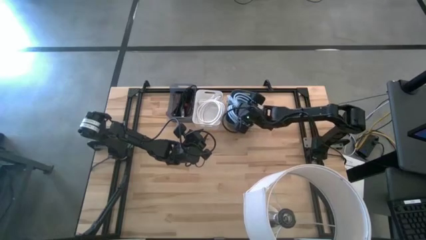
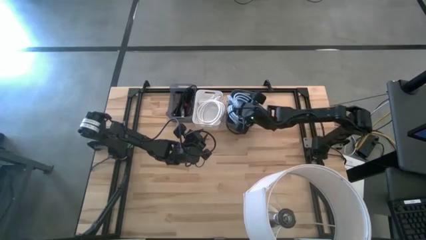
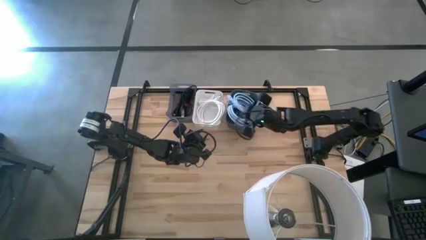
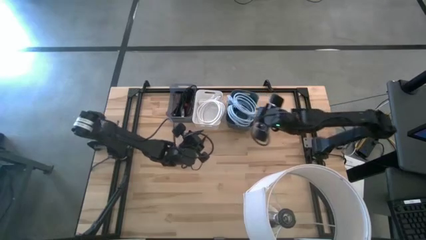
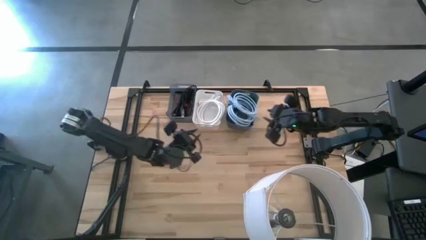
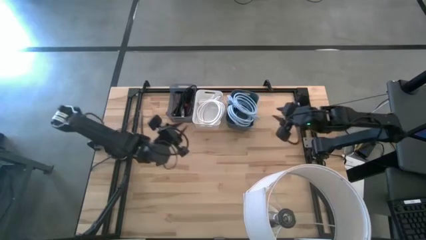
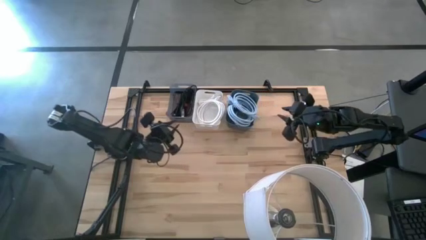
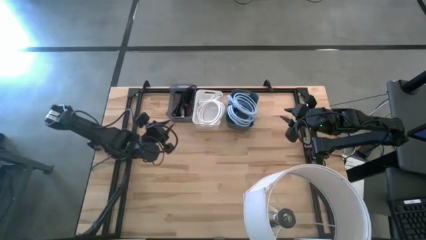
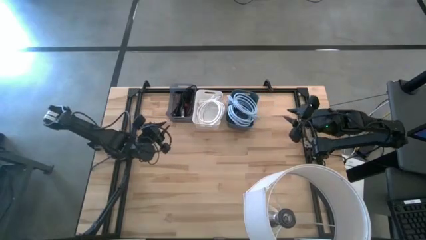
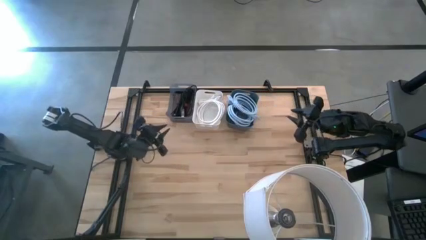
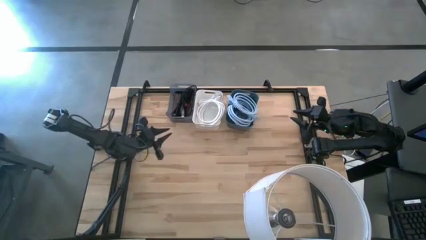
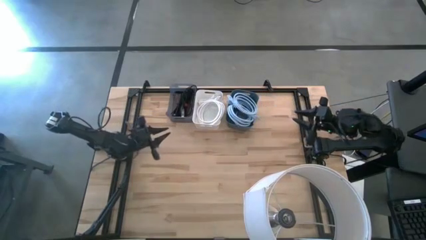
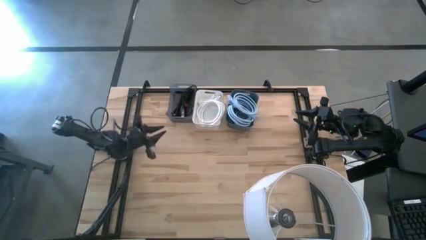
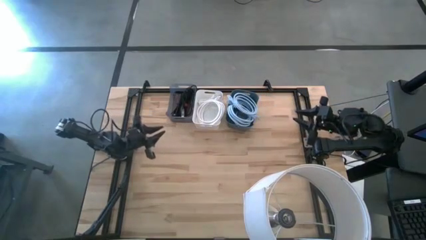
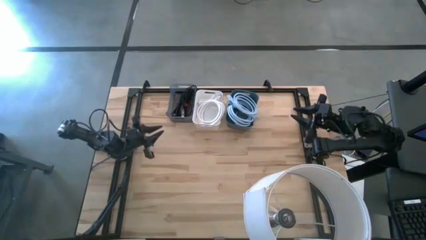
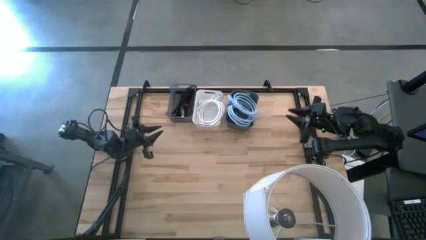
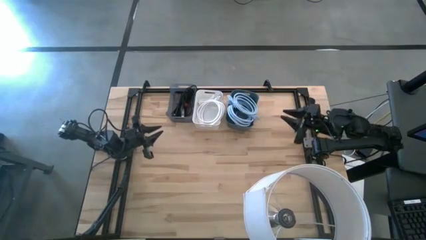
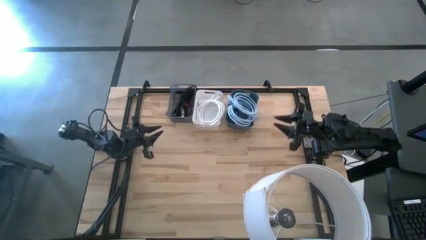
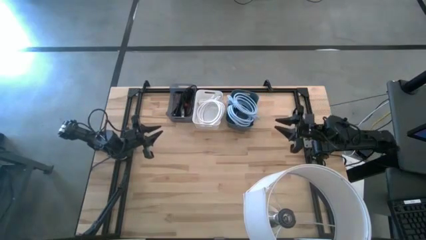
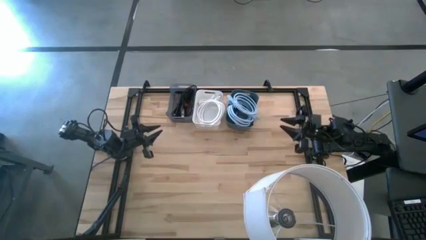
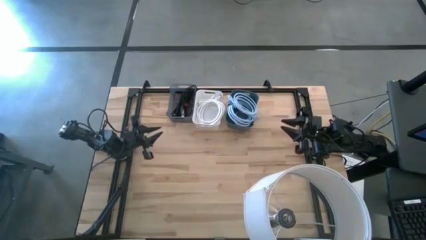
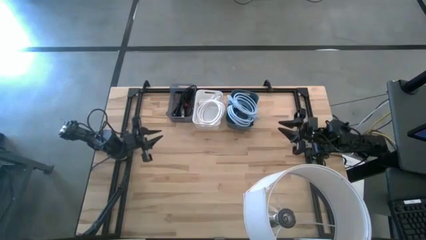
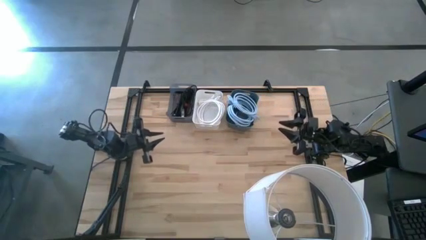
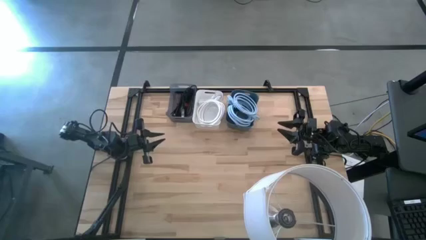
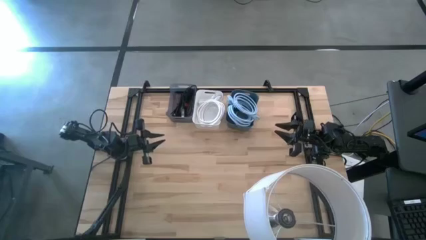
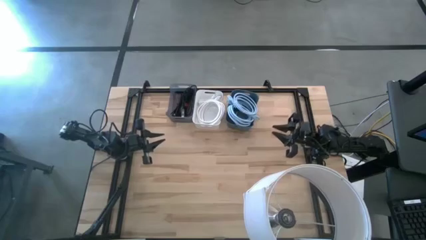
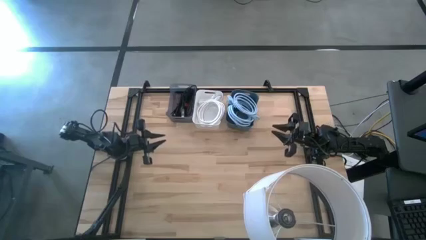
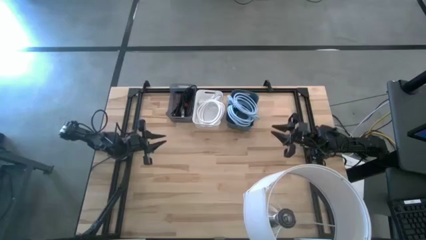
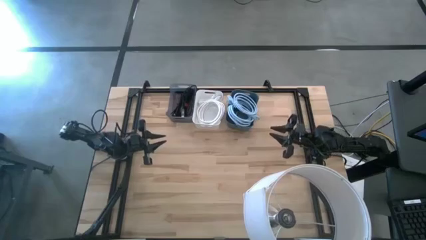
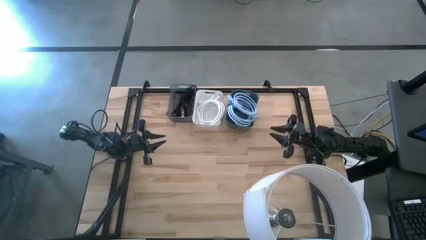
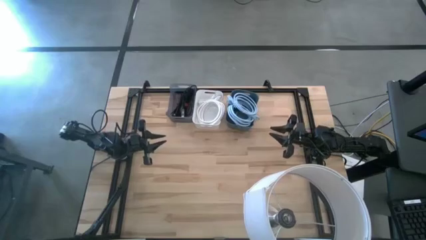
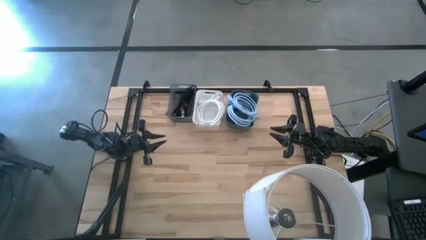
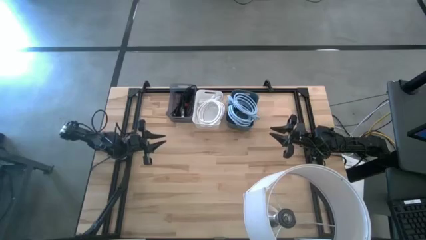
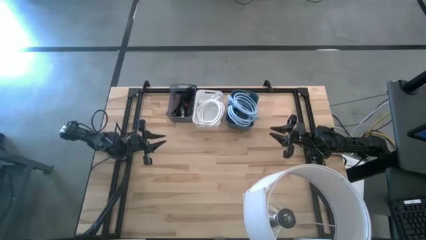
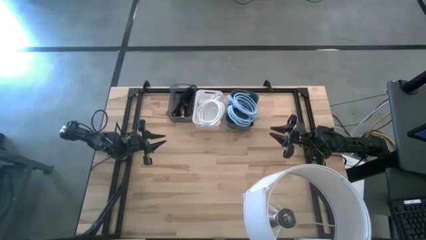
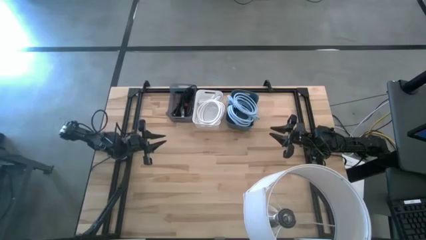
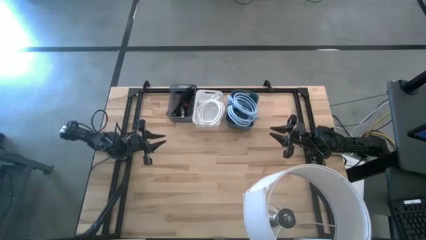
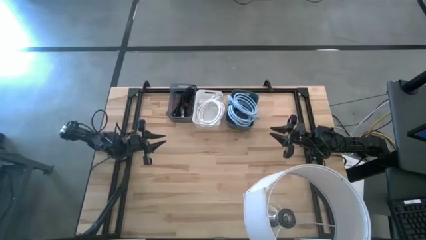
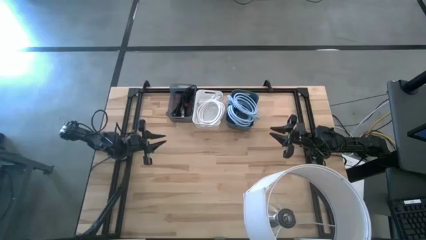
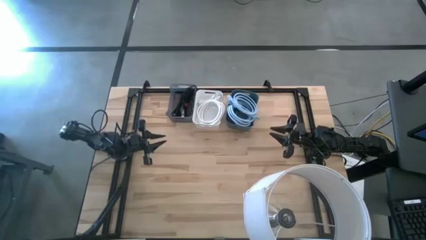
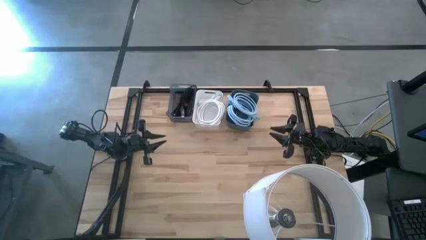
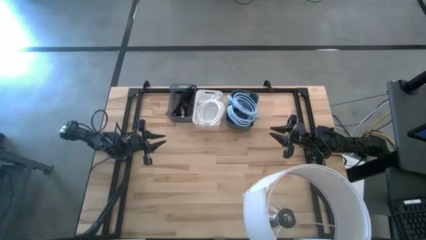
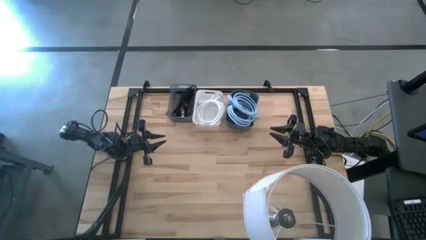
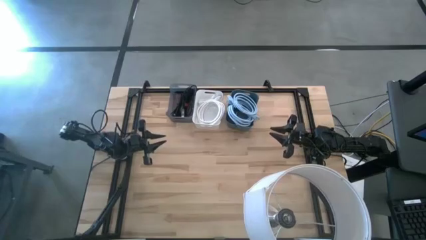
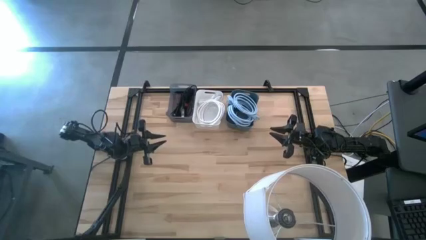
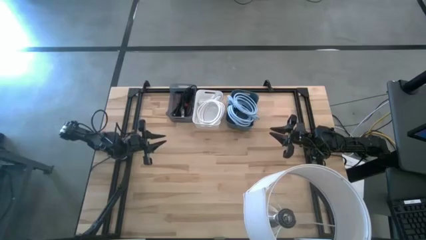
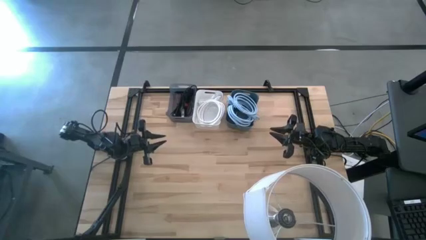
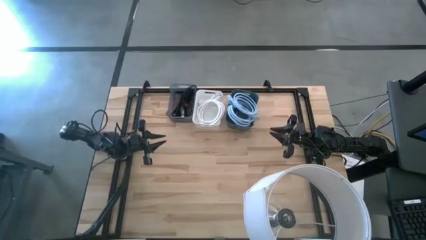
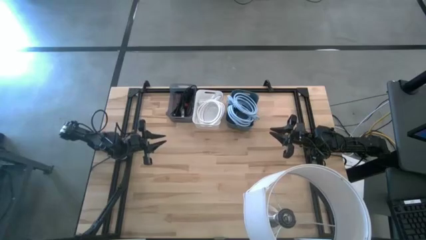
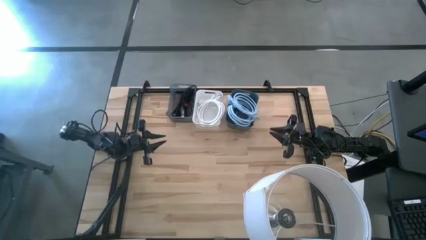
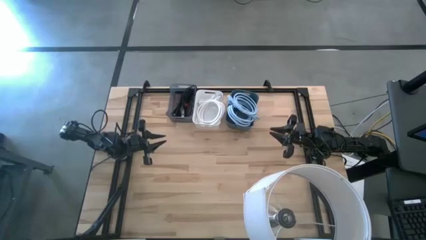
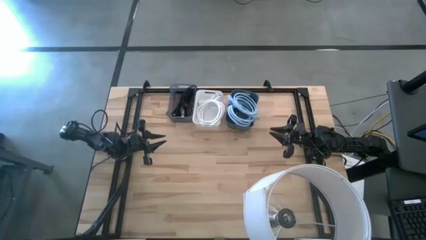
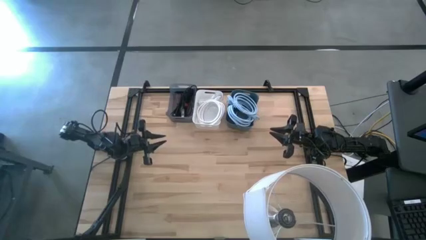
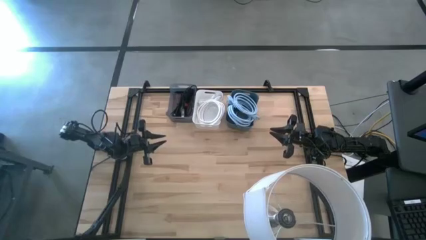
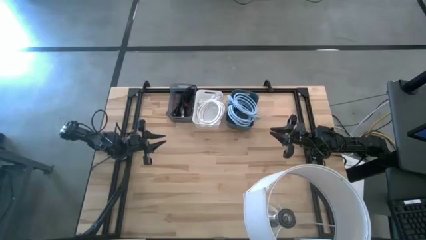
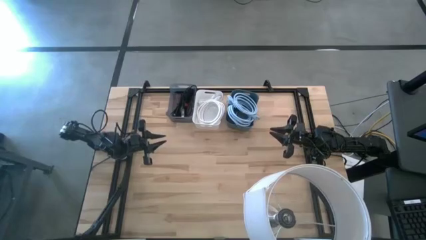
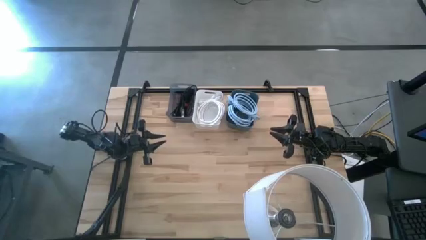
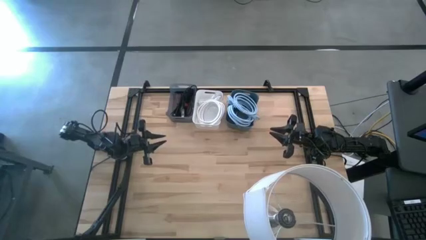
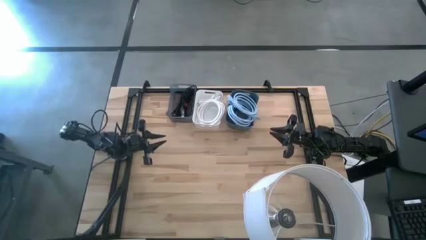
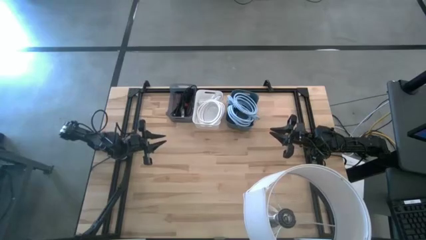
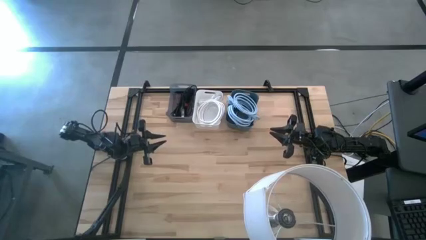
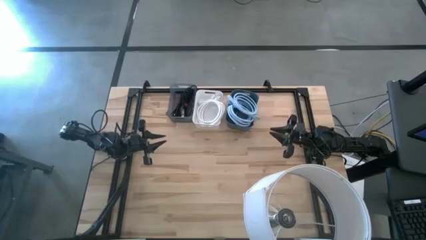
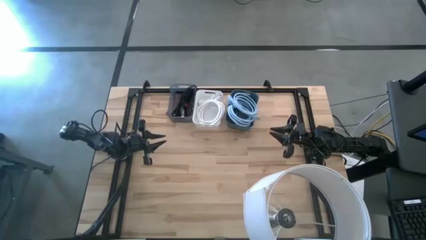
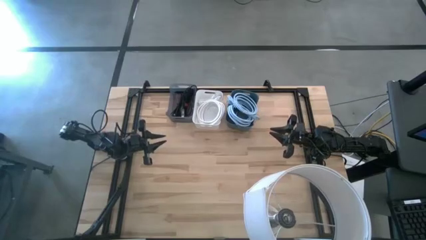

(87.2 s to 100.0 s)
Task: Pick & Place USB Port
Return to Home Position

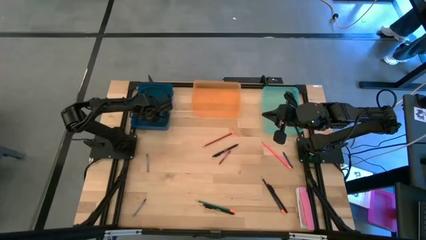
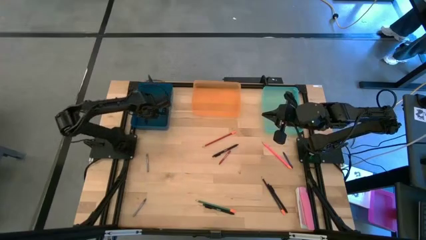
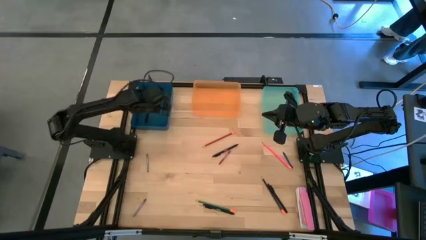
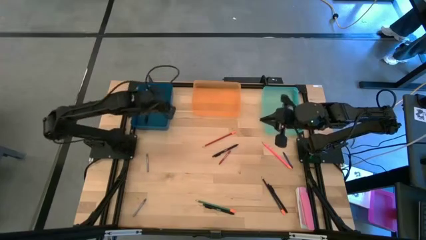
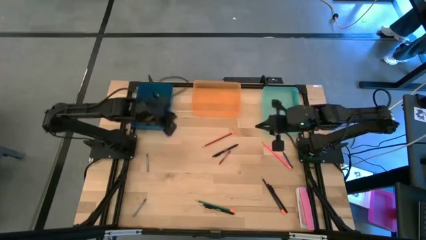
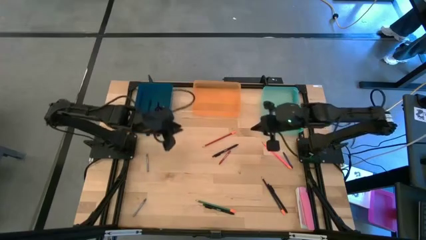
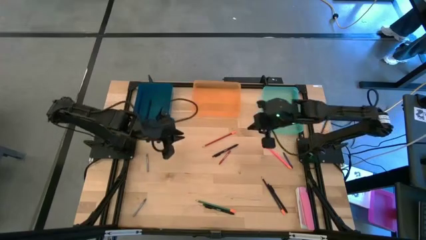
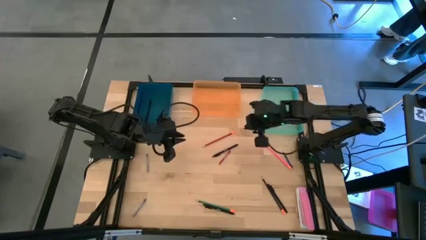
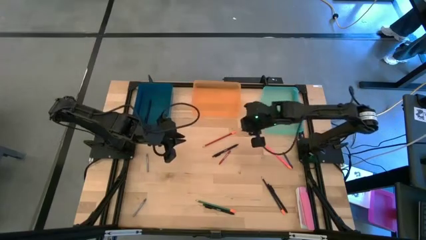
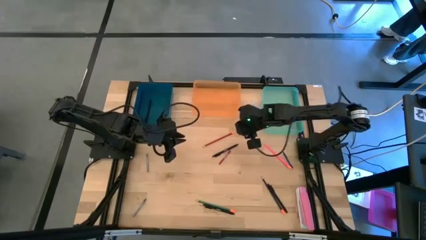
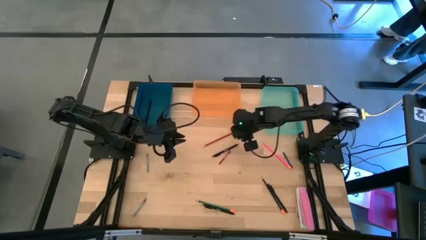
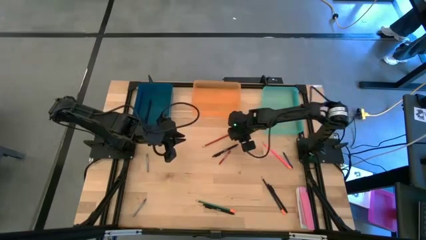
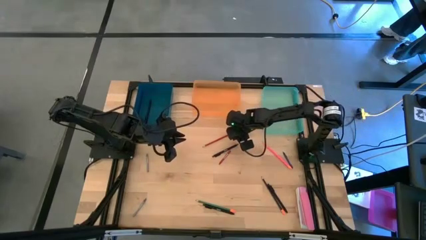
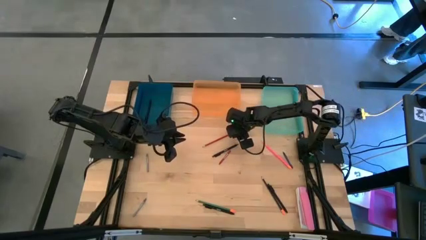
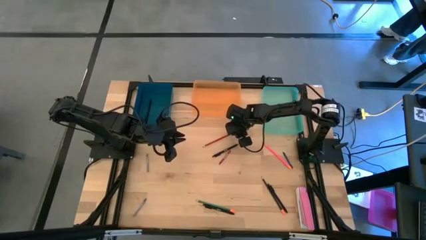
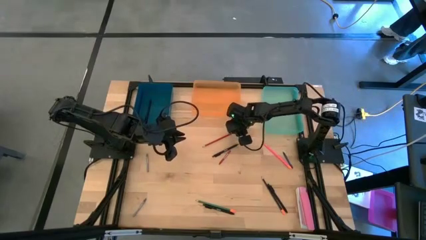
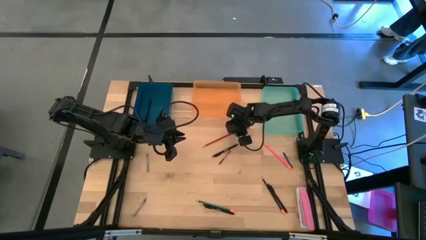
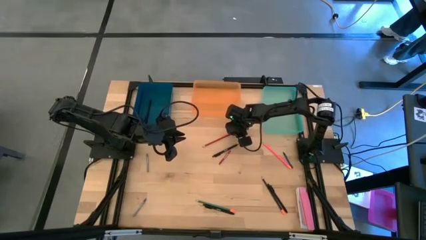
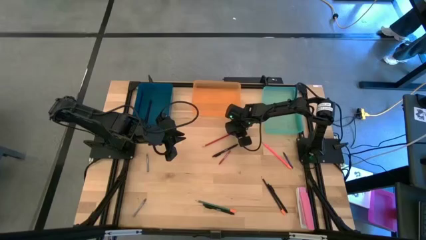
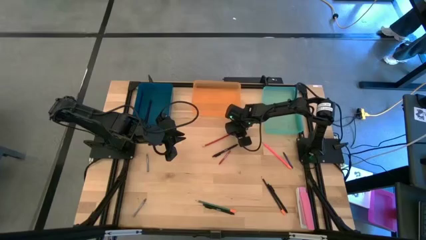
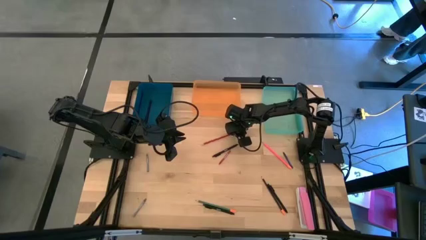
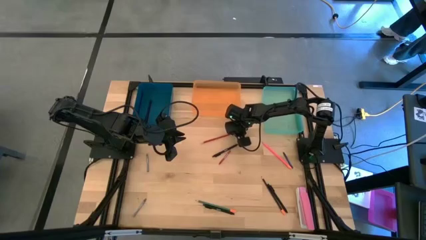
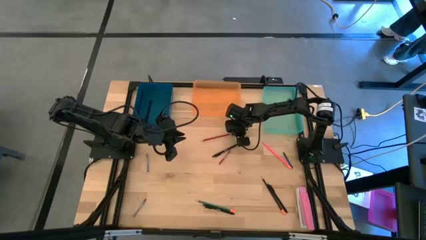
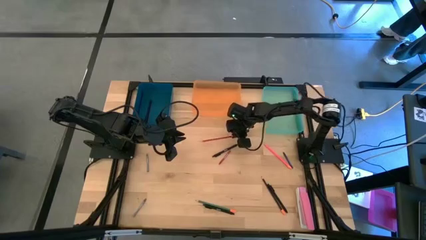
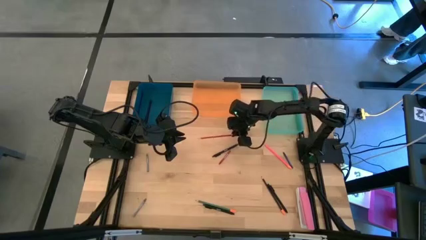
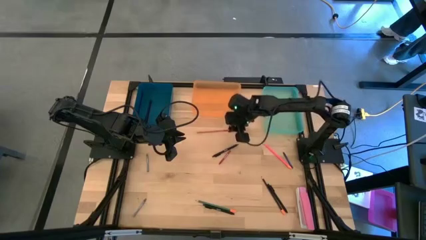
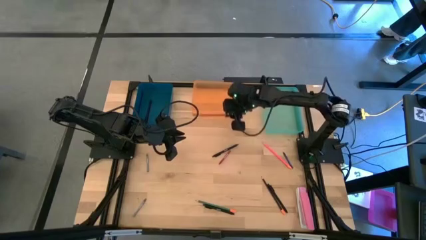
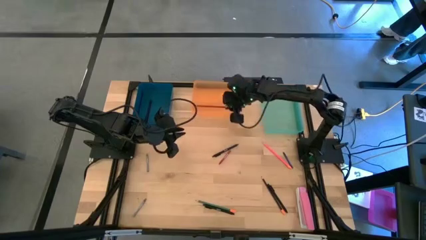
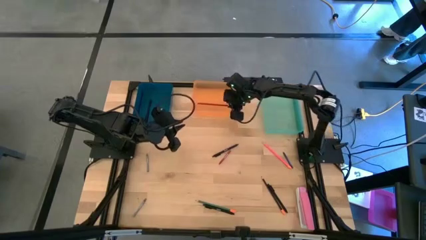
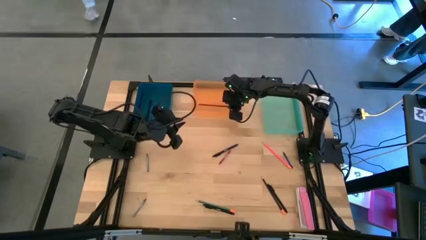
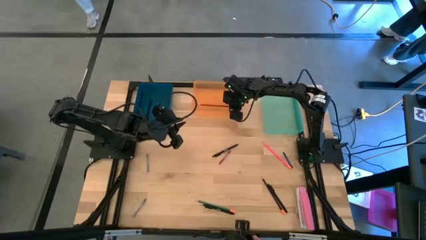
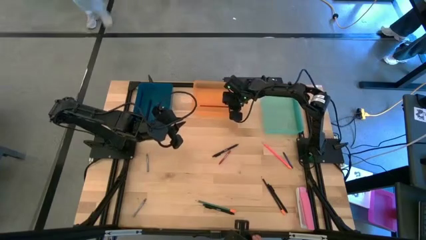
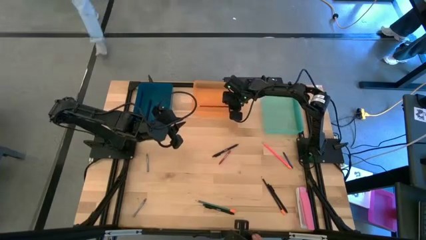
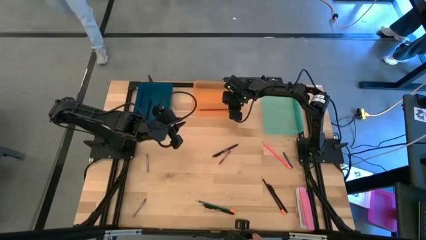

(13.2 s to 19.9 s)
Task: Sort crayons/erasers/pens/pencils in bins
Put the red pencil into the orange bin
